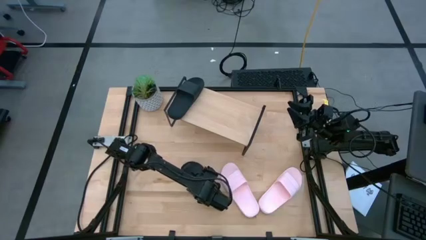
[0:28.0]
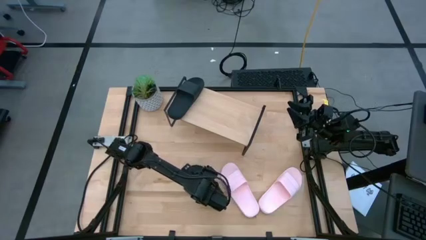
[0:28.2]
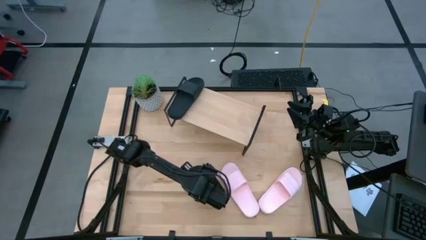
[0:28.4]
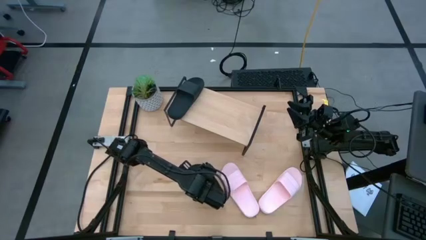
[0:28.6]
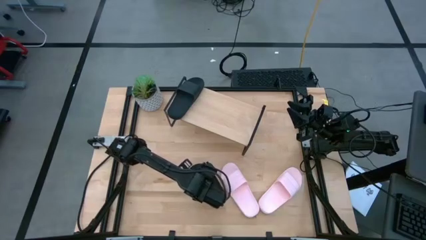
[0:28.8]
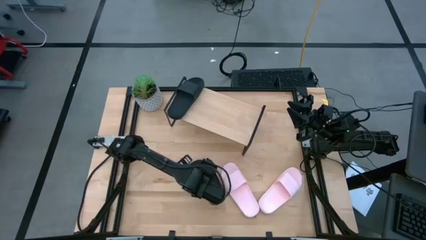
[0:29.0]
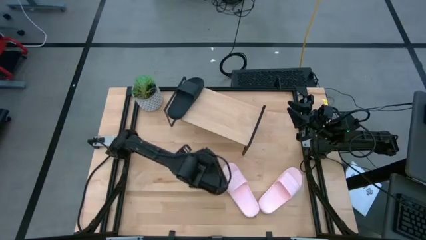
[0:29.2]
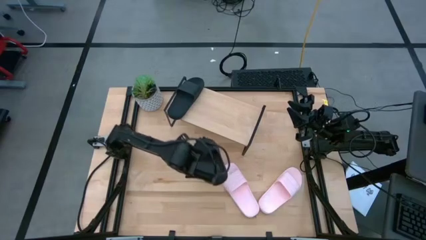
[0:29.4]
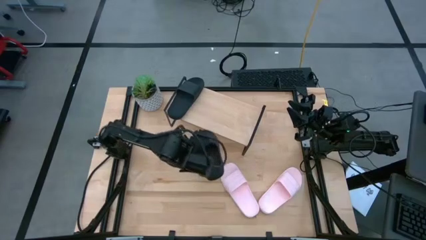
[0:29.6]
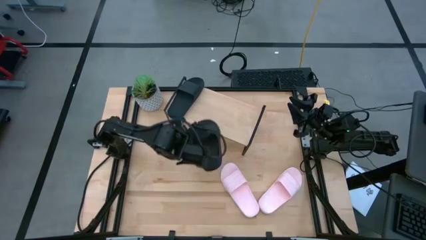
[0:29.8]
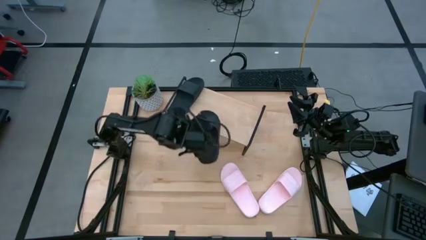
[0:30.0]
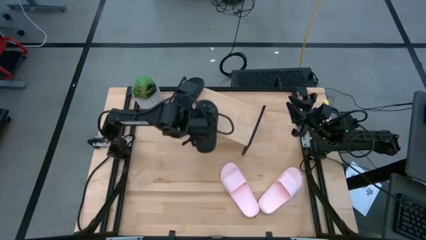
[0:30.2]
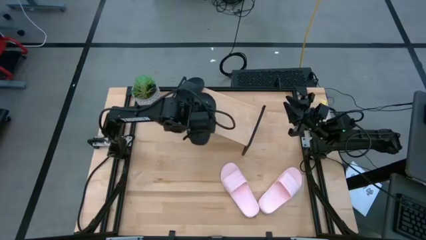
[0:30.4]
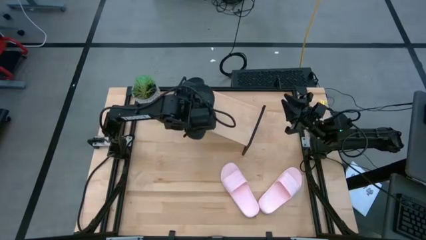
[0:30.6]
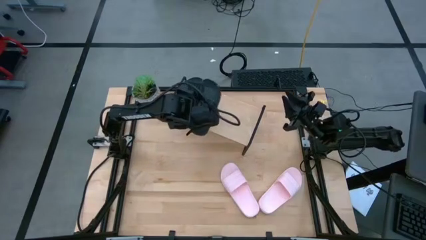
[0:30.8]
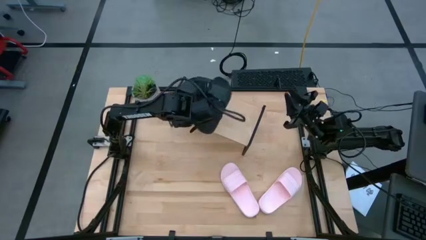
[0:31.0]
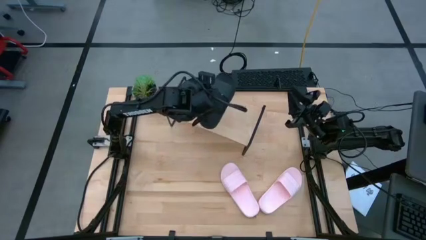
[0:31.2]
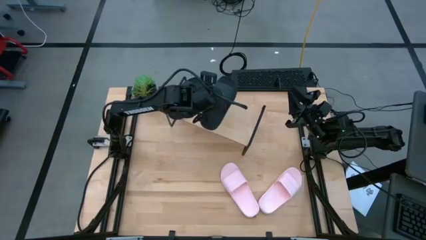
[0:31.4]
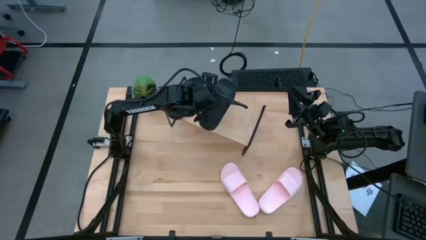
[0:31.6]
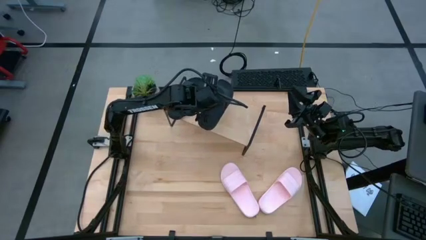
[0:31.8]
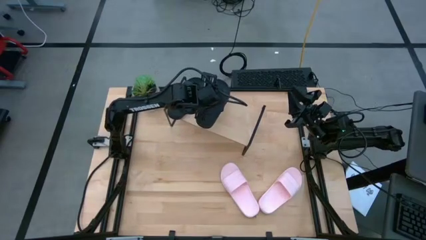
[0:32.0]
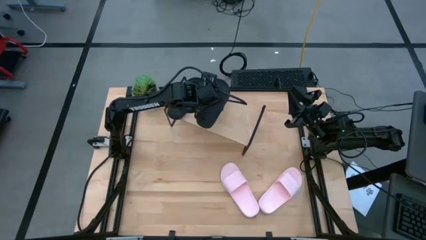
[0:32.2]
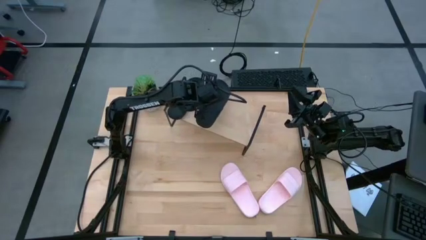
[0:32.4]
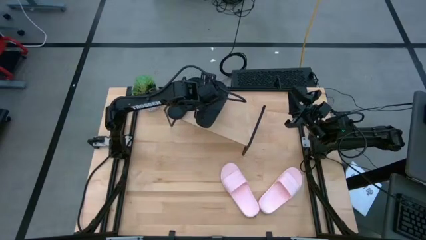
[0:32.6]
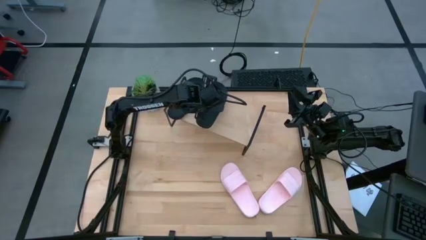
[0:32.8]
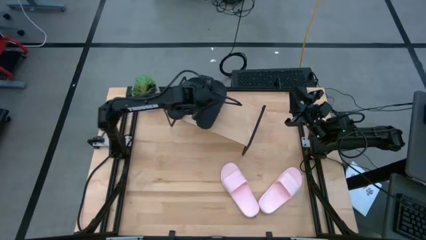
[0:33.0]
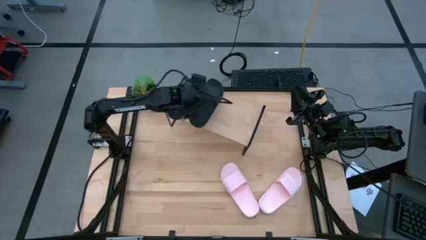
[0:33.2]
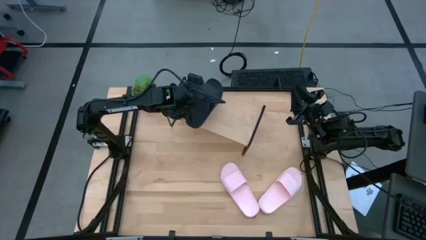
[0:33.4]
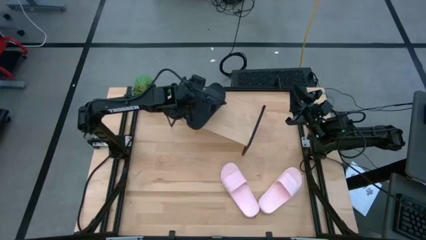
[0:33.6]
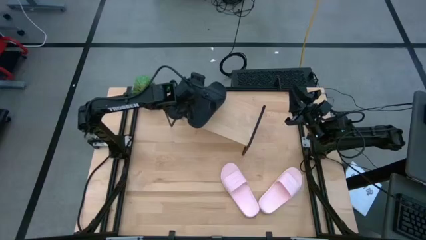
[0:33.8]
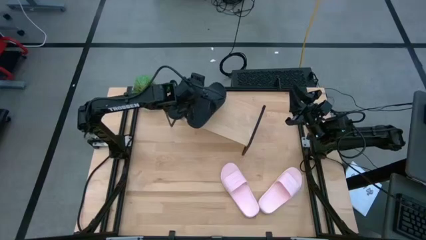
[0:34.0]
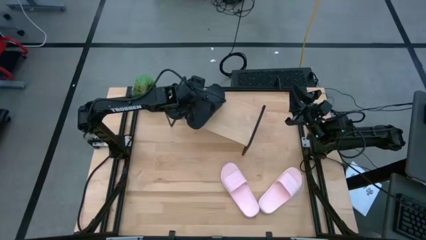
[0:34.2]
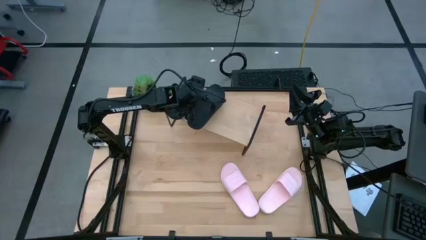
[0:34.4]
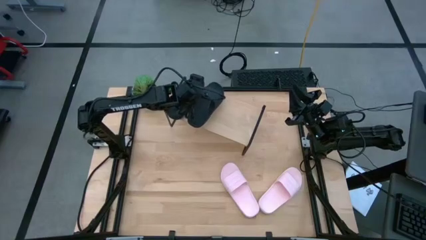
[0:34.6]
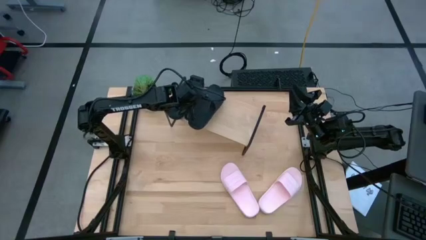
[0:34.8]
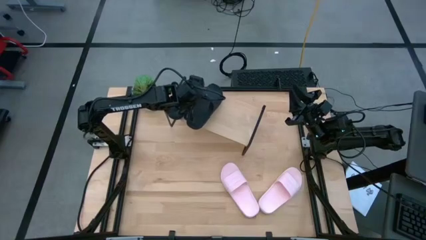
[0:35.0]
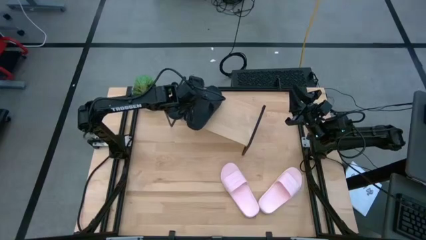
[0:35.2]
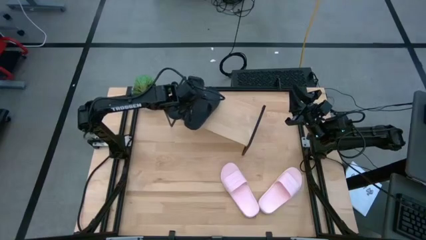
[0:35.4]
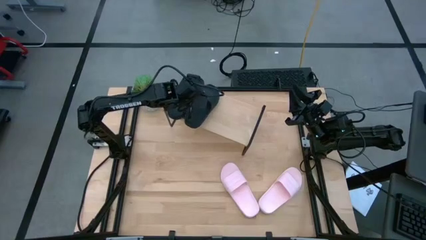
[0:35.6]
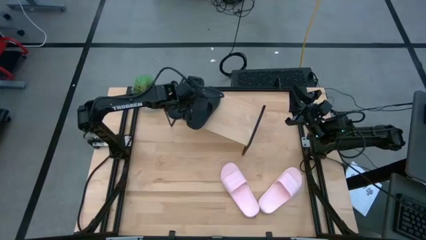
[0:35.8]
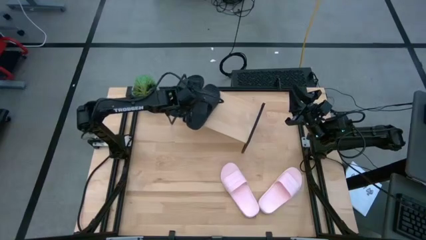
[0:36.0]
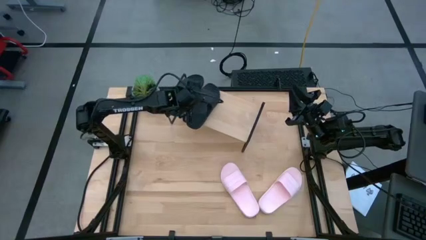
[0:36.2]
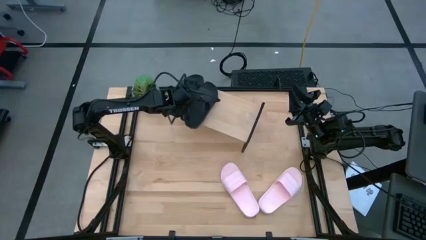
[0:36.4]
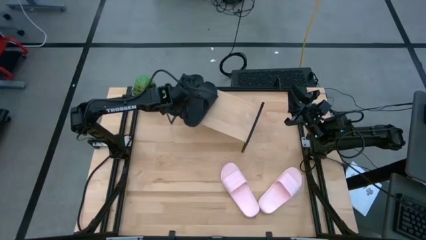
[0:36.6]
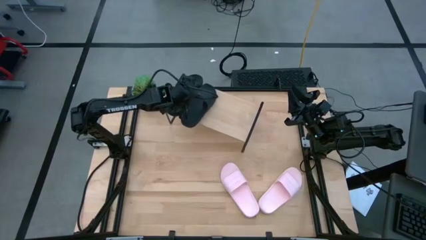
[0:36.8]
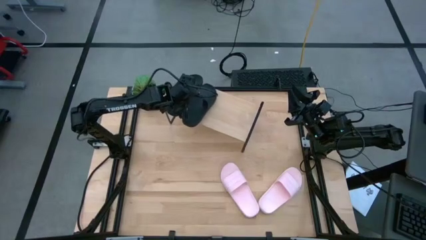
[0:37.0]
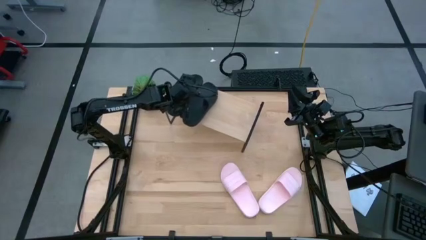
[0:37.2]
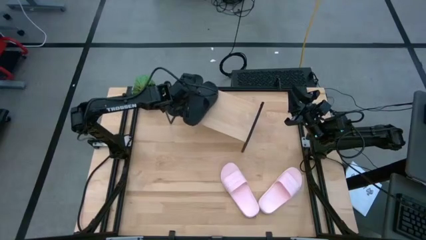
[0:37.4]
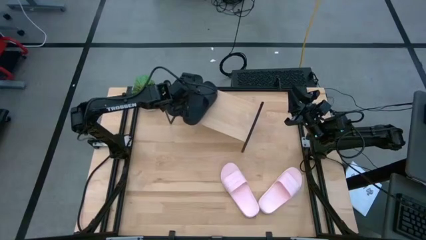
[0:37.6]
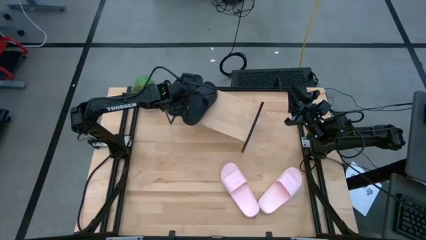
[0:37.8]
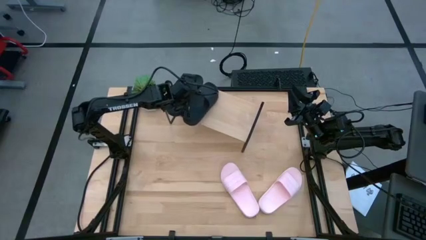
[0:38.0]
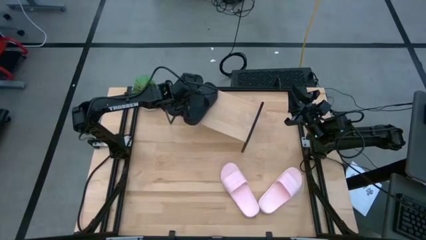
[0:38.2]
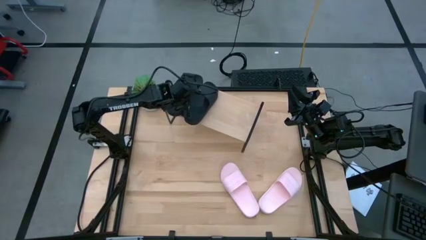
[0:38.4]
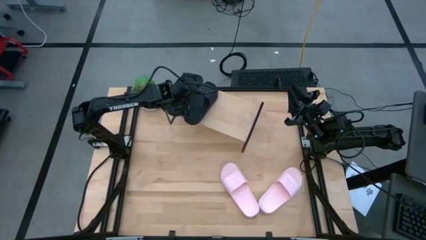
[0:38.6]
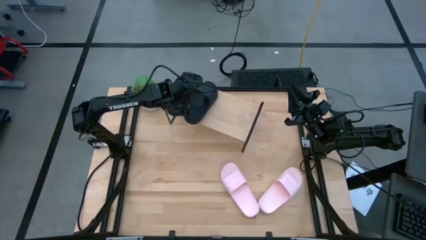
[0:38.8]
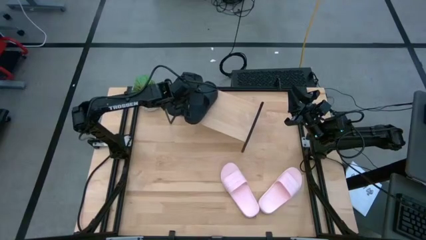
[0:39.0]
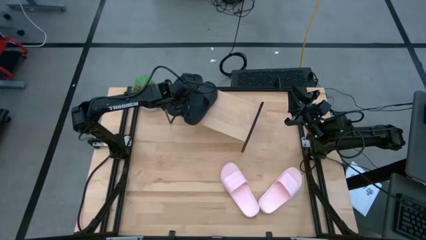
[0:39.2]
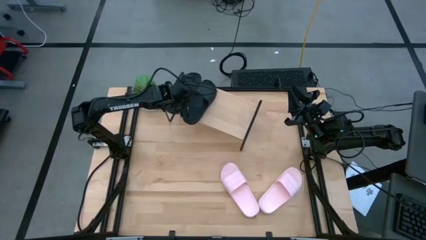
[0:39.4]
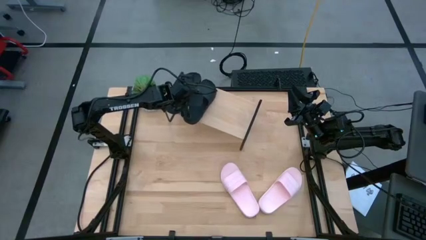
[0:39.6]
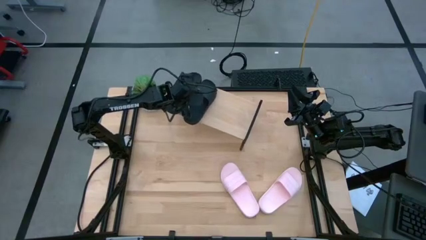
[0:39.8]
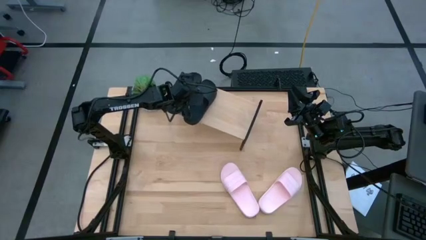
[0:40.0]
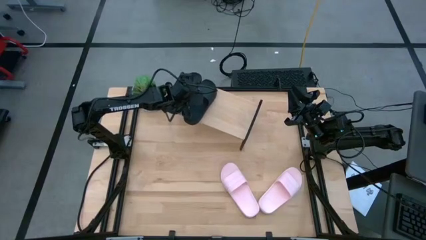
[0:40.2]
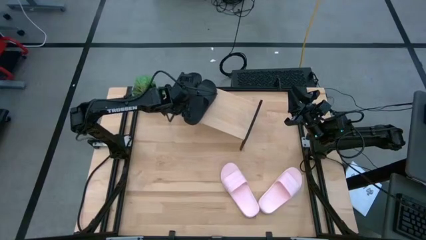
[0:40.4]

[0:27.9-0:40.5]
Task: Pick and place slides into the shelf
Put the black slipper on the shelf
